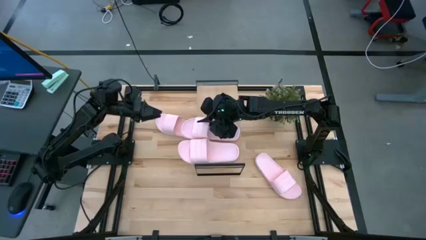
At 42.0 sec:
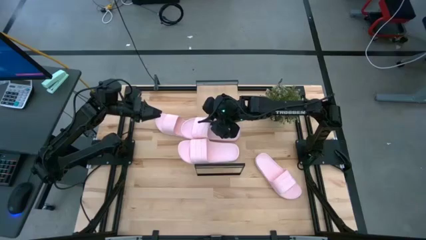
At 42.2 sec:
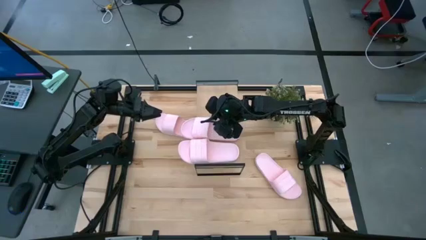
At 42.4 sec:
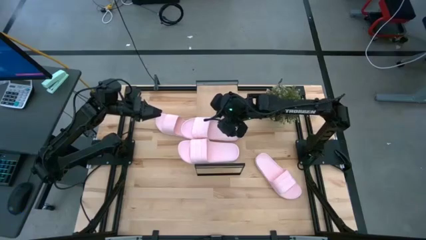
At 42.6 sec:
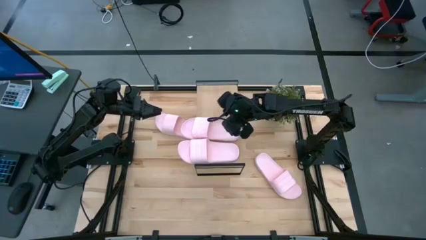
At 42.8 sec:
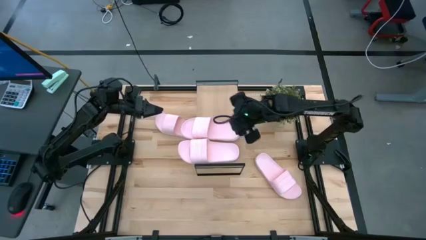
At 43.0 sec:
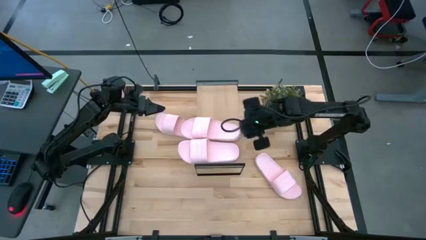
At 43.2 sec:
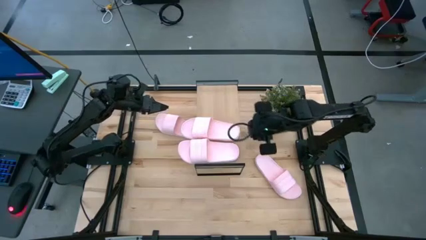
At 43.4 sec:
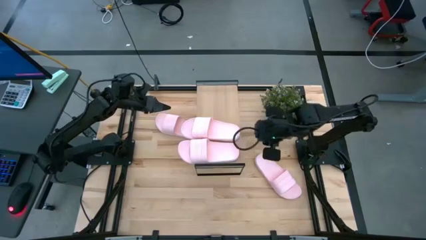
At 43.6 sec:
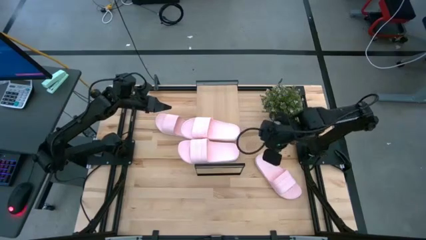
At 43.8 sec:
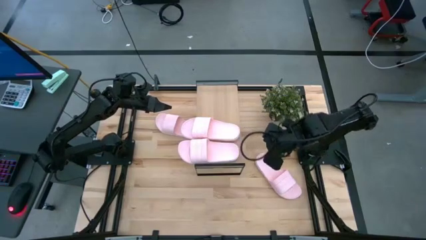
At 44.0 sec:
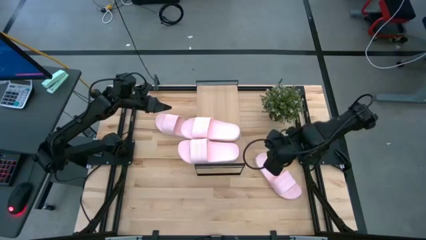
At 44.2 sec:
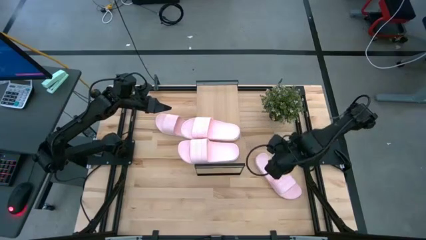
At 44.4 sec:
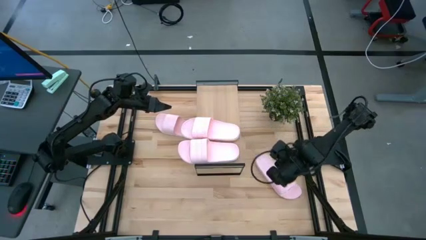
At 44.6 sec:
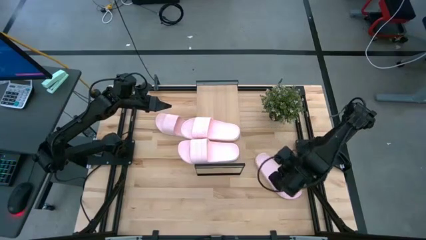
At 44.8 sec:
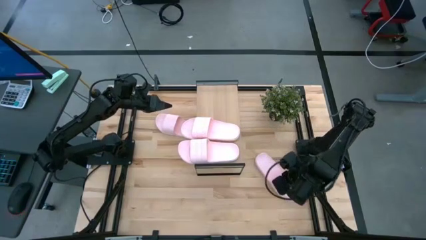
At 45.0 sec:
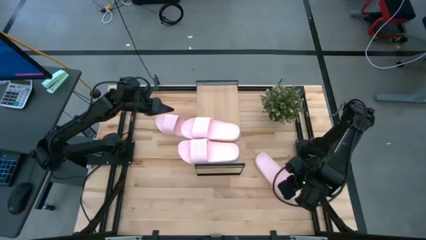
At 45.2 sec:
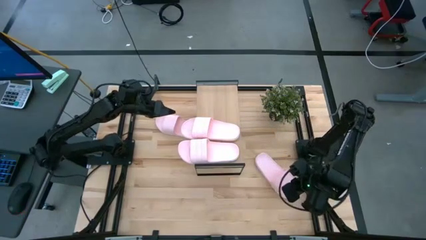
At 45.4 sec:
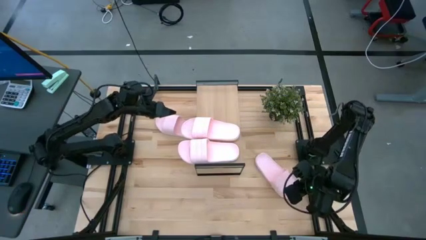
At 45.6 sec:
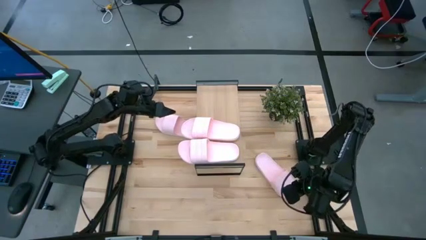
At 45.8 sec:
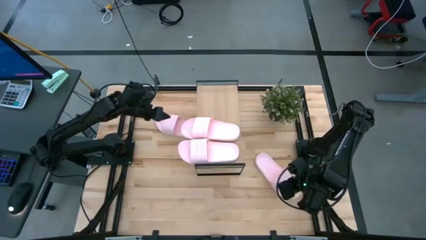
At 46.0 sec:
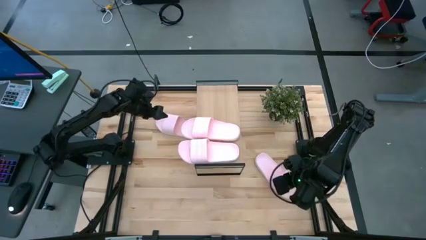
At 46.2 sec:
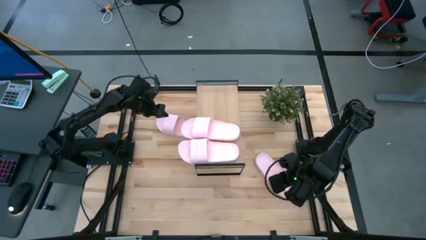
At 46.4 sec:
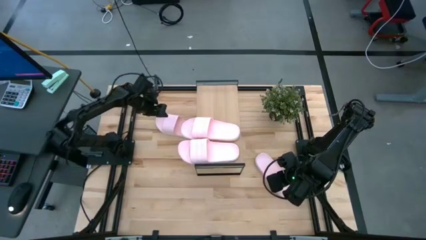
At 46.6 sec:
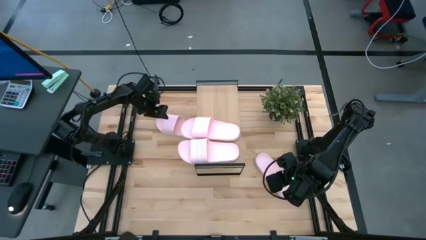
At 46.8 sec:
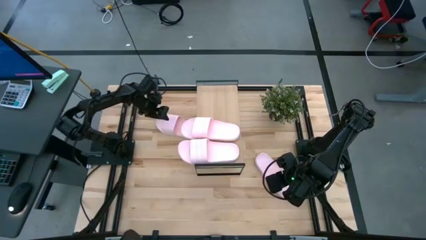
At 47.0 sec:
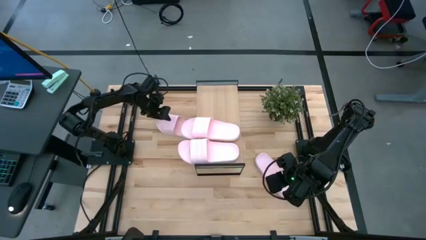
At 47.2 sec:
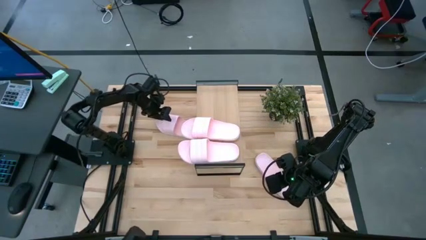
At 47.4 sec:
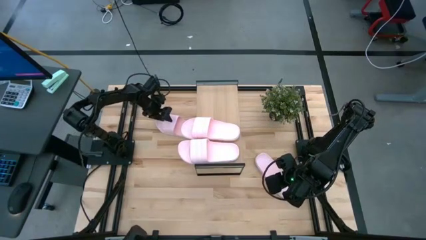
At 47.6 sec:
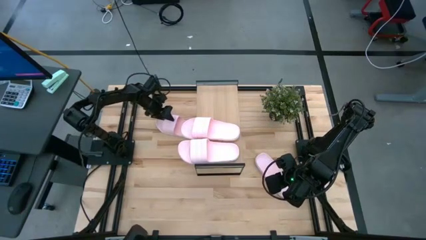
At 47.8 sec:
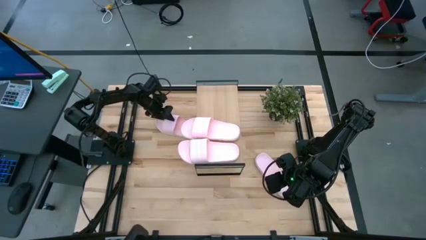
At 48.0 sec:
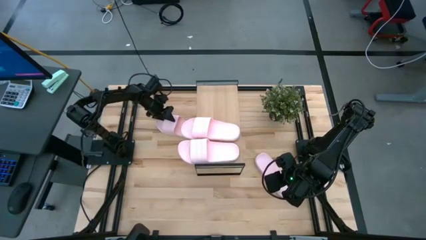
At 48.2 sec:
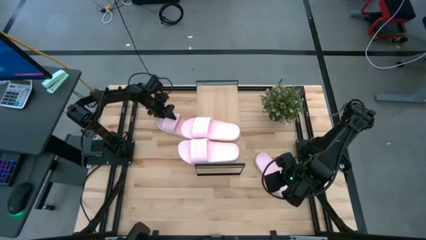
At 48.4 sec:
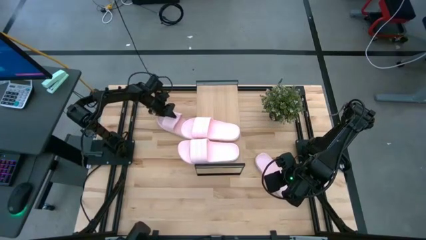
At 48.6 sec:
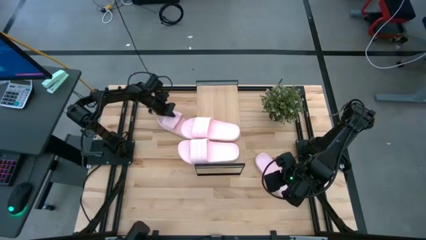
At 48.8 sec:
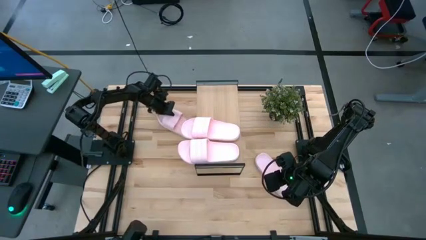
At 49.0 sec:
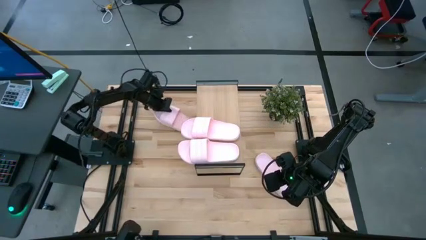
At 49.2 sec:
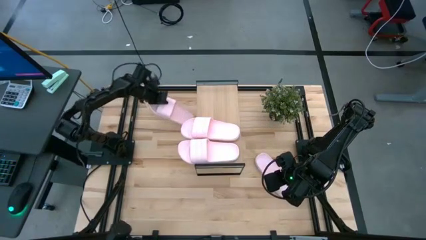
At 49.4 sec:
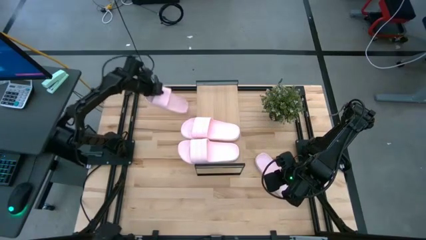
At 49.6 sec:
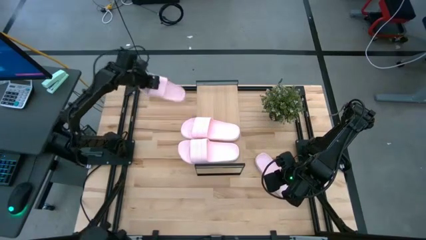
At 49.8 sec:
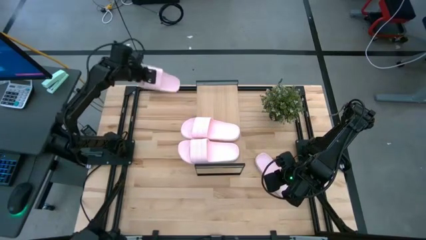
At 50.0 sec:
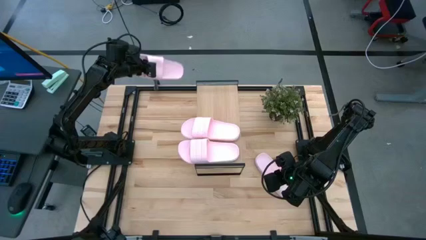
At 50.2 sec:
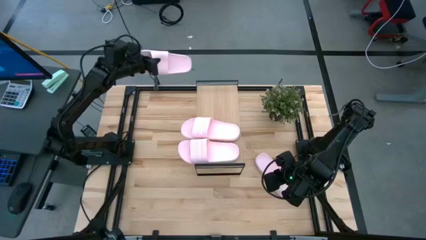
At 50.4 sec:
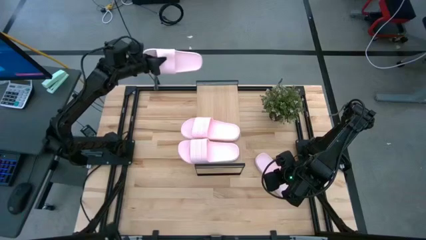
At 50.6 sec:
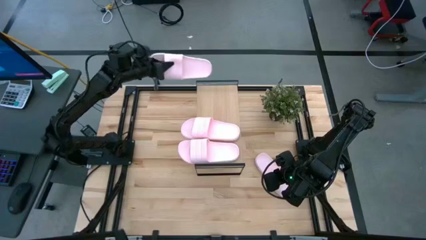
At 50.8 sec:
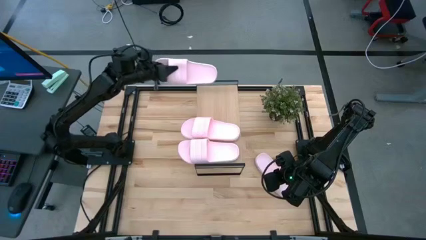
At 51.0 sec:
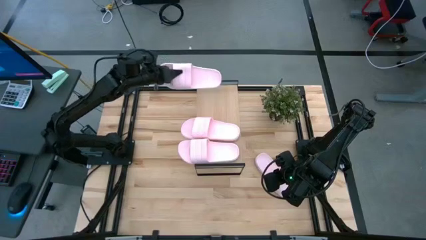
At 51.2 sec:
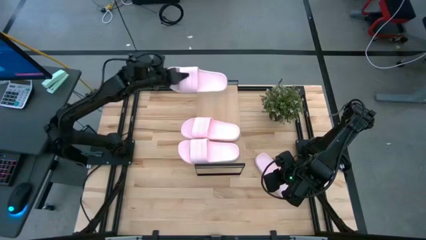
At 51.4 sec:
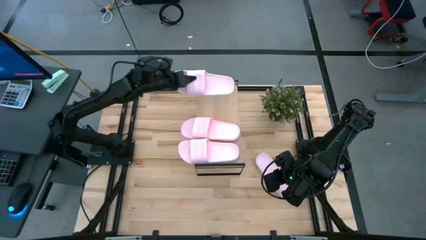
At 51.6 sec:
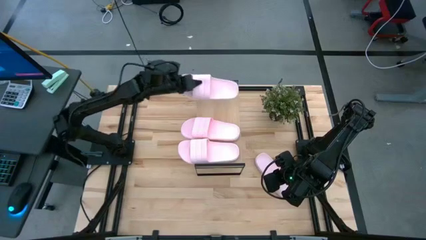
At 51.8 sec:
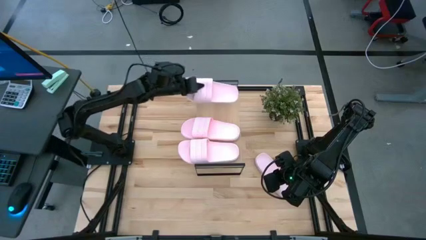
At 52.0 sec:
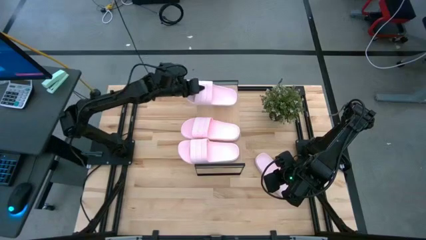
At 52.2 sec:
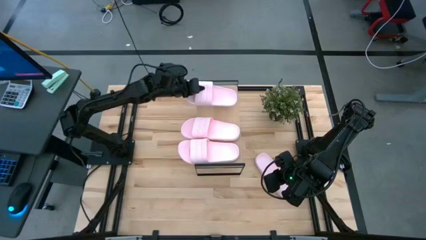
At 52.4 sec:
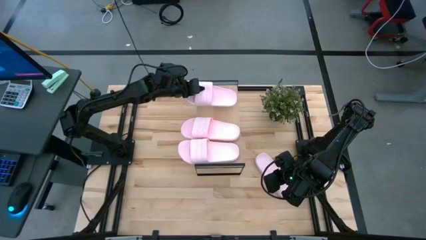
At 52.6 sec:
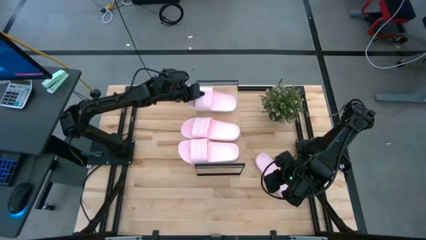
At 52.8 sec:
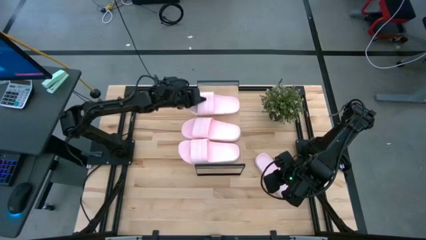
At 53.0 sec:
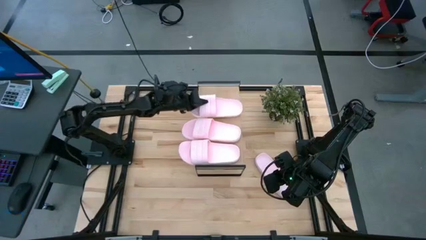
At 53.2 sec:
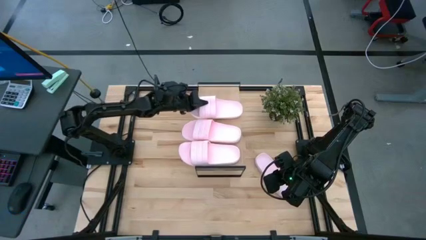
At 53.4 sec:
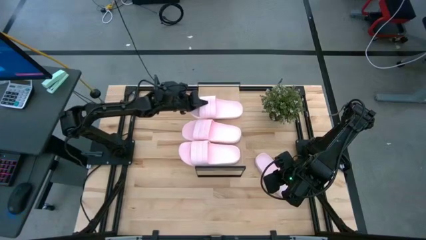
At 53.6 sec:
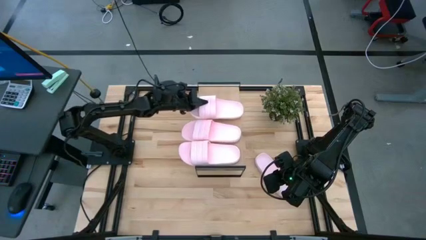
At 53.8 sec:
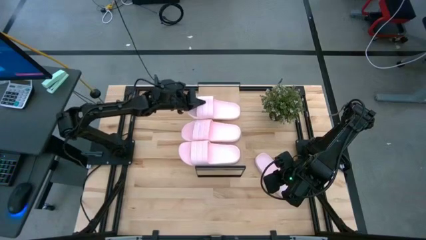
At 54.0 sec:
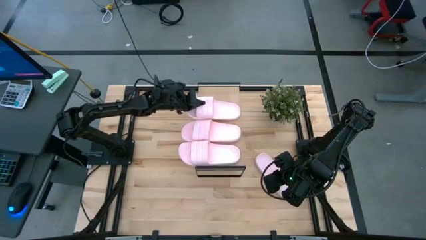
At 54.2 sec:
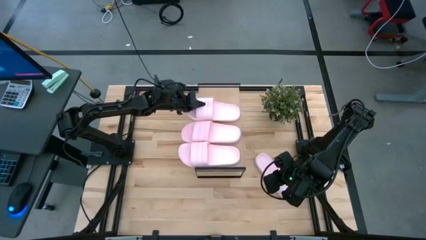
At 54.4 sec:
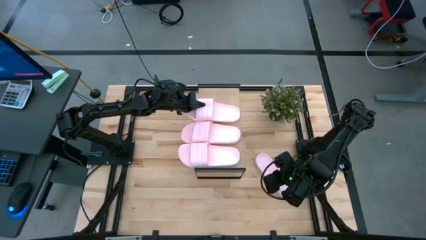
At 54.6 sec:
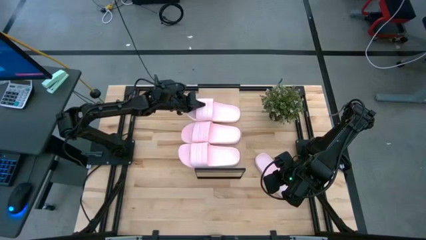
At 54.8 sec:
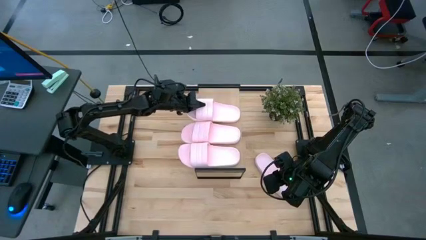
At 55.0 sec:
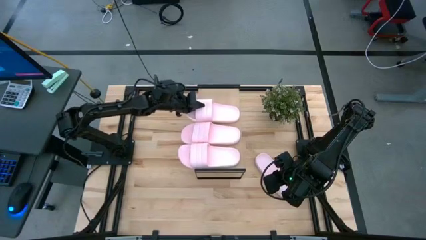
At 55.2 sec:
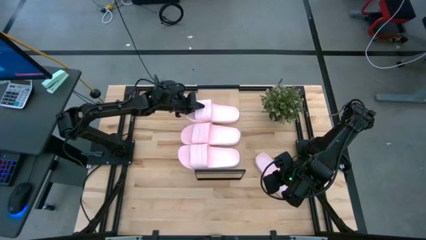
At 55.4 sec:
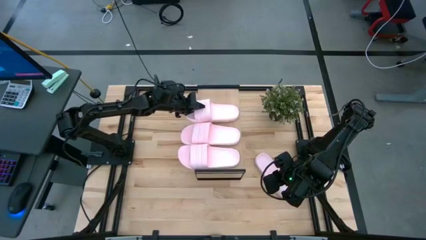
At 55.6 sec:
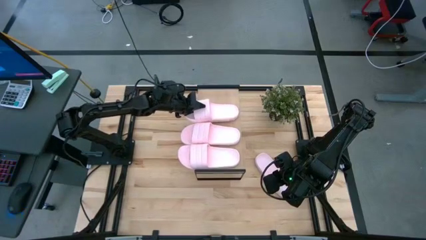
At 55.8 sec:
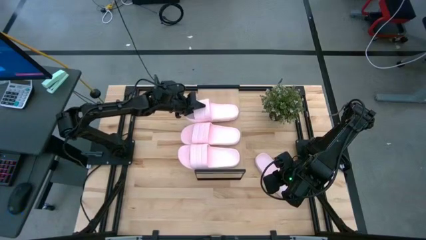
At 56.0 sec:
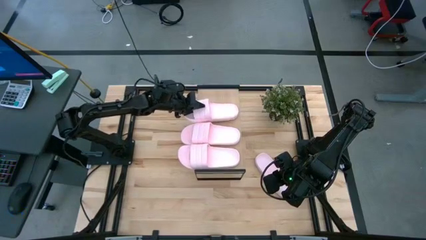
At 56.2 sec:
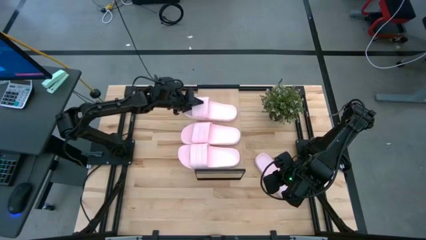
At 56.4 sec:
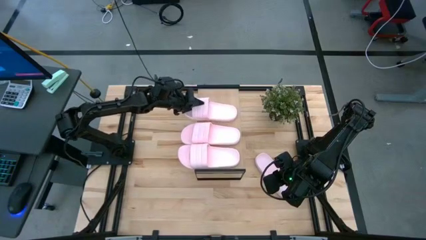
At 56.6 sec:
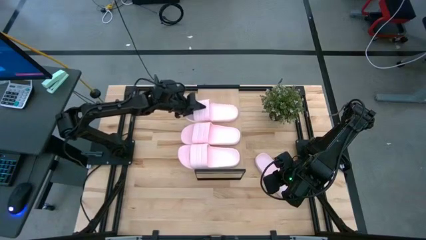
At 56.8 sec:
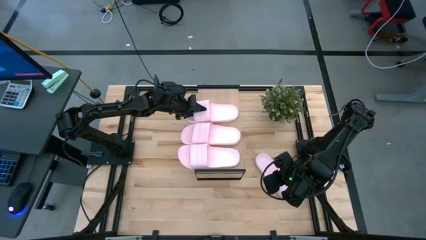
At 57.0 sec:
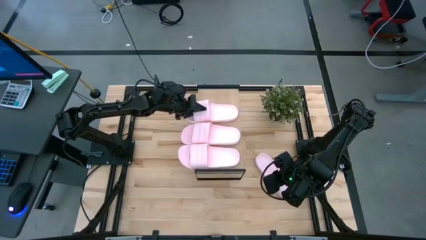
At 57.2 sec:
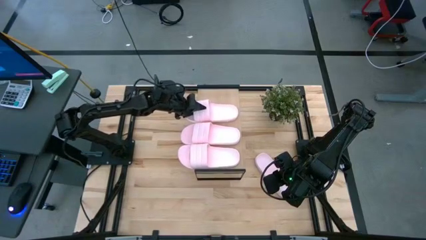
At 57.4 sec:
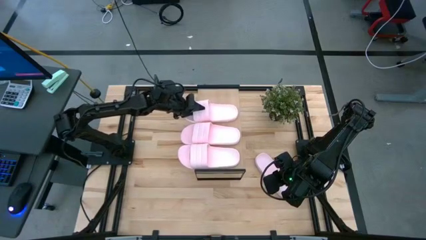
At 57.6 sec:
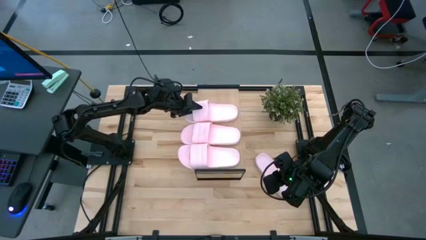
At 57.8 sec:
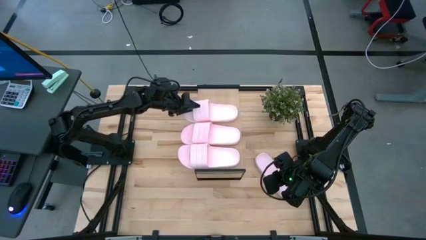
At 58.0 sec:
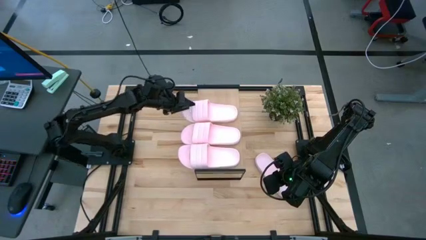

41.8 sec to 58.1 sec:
Task: Pick and place slides into the shelf
Put the pink slipper on the shelf
